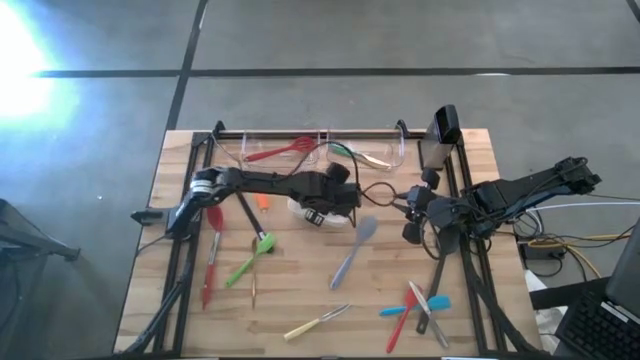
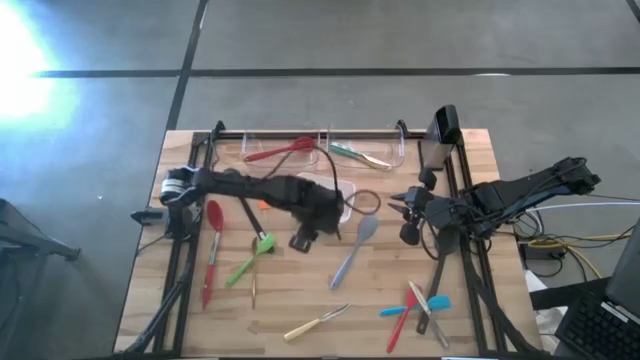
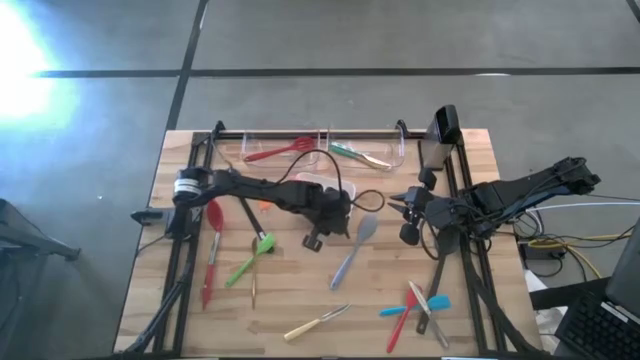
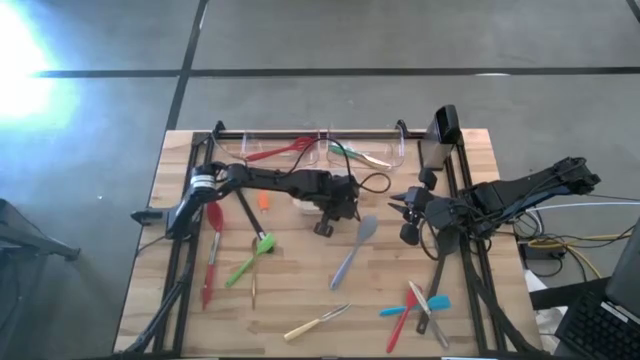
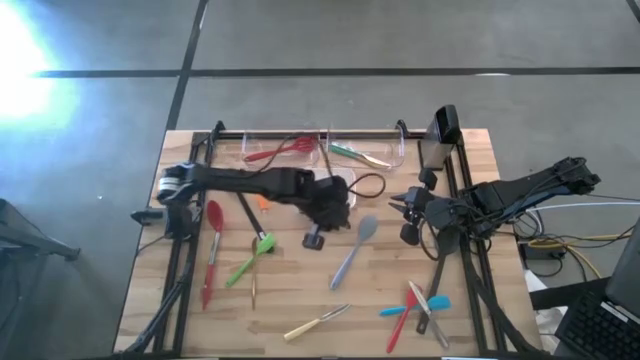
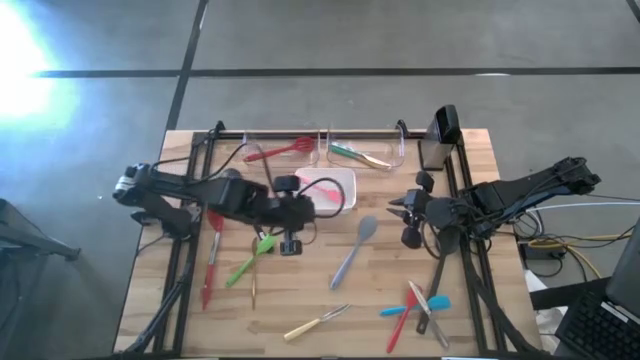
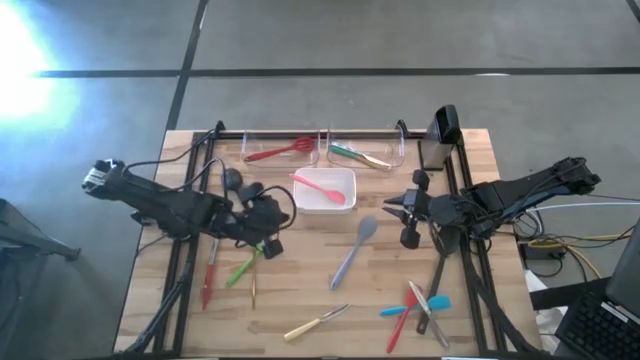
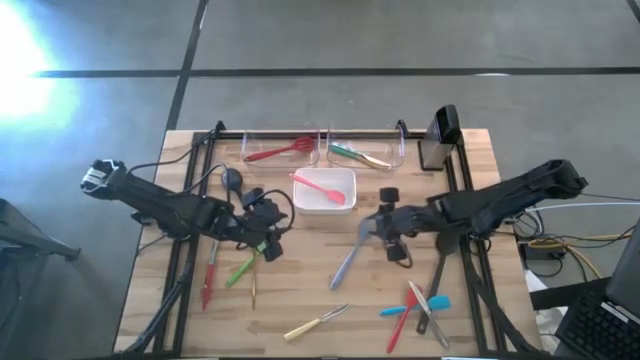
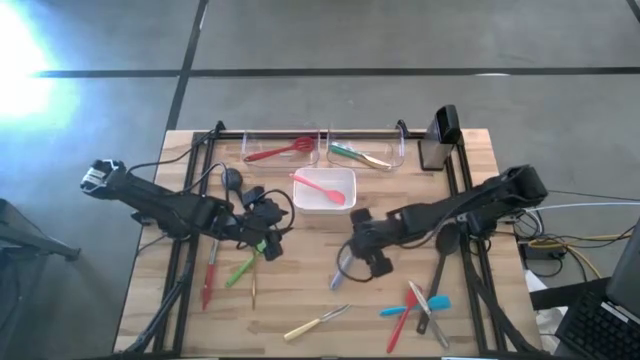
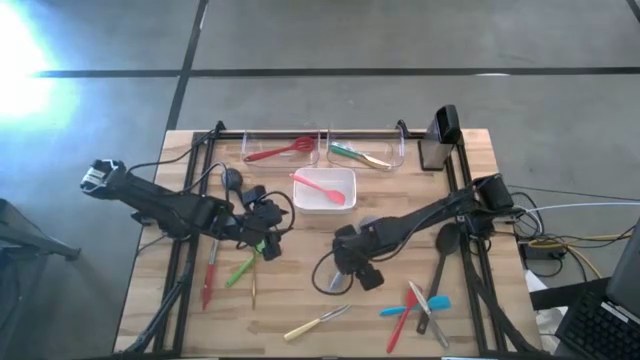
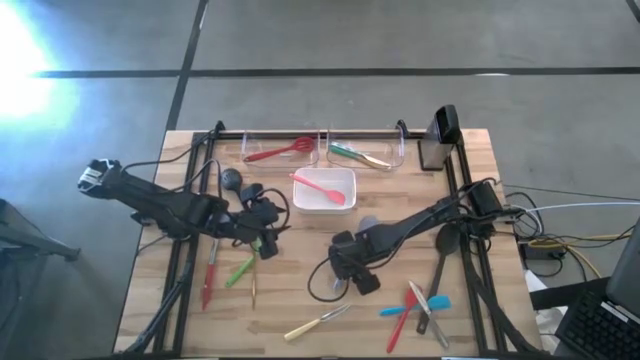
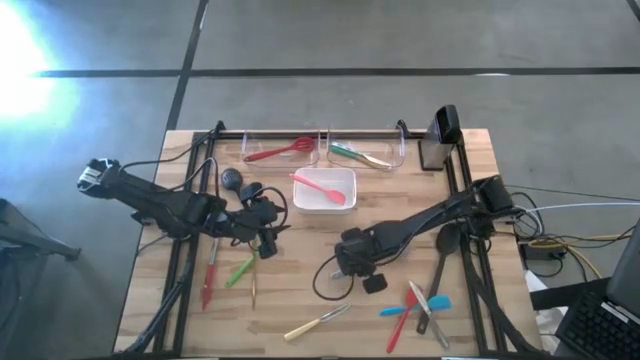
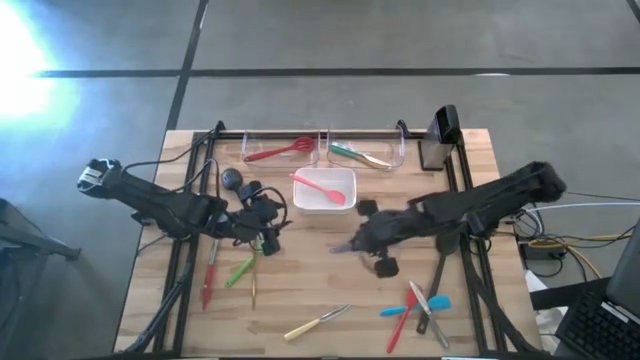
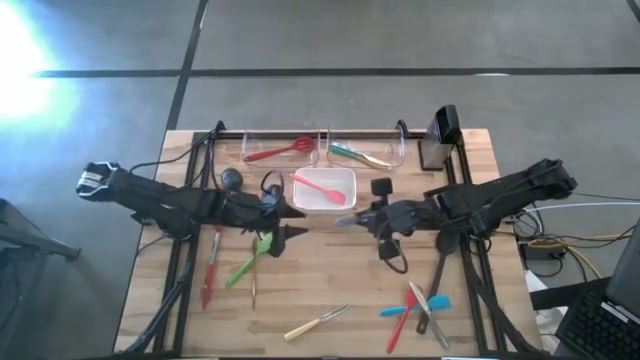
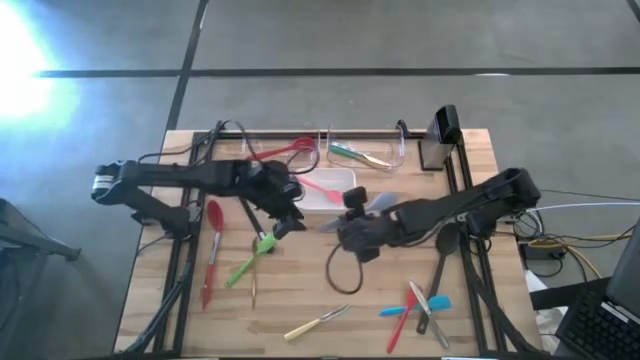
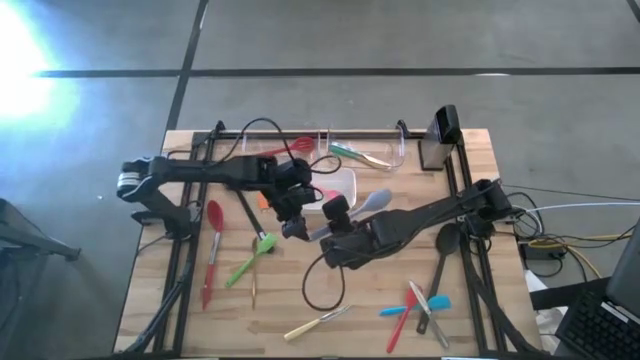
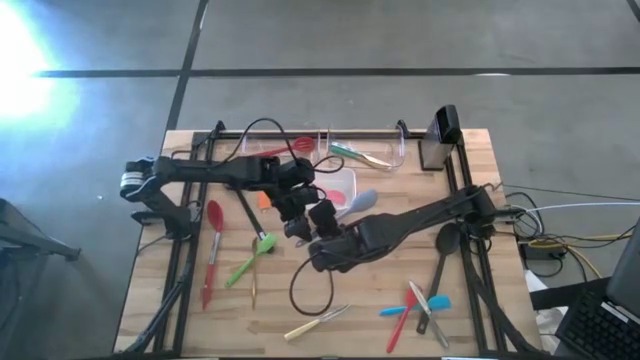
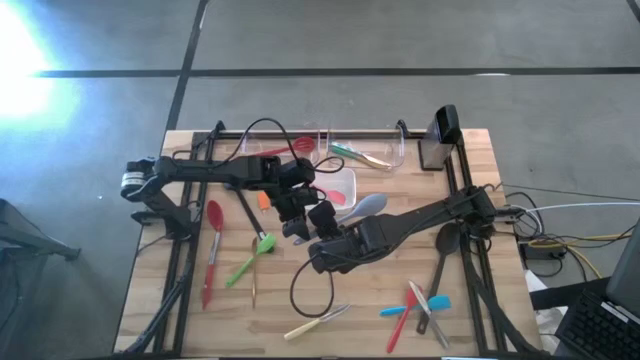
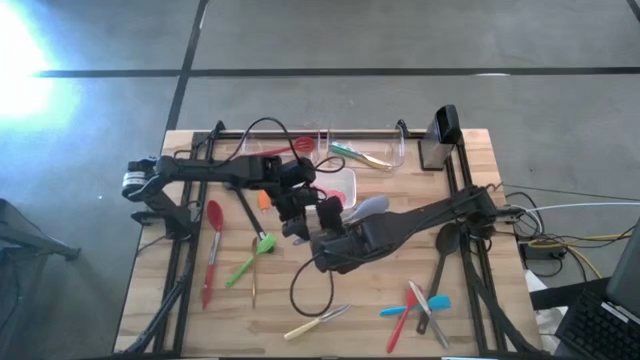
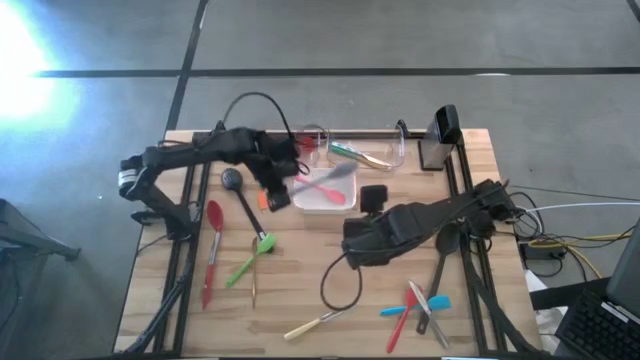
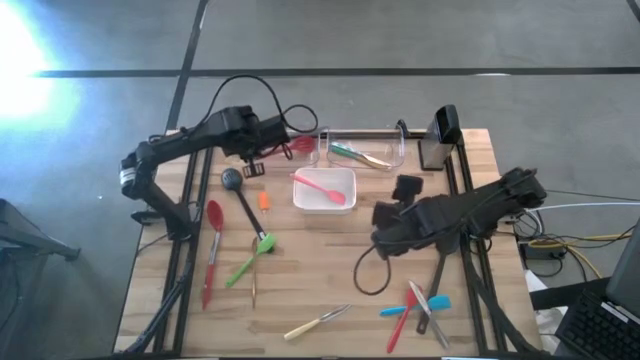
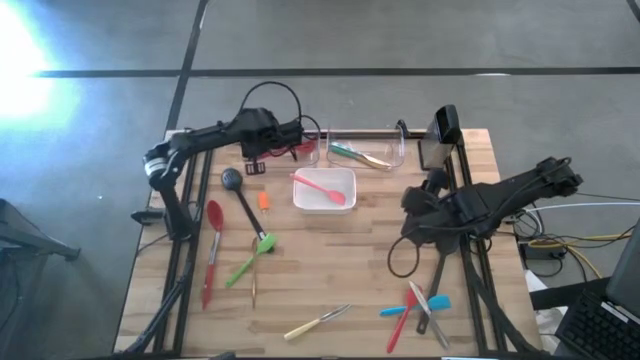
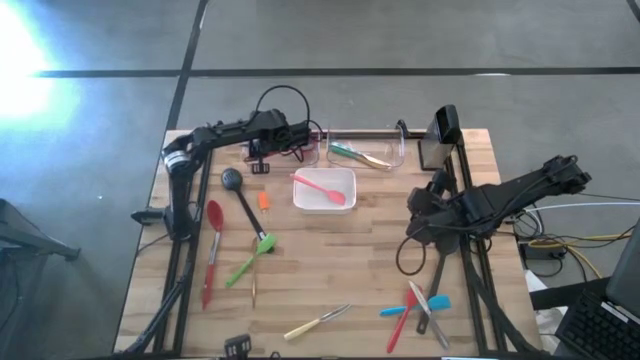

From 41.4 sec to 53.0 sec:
Task: Pick & Place Kitchen Items
Put the gray serving spoon into the left transparent bin

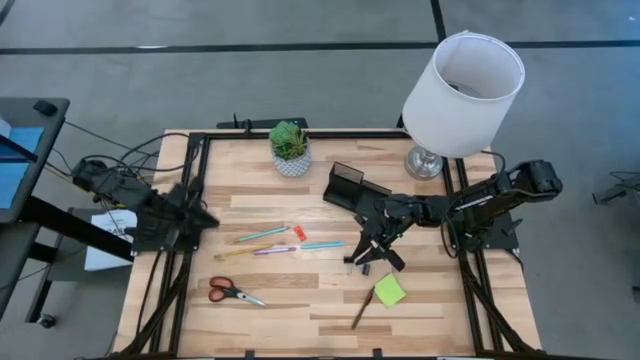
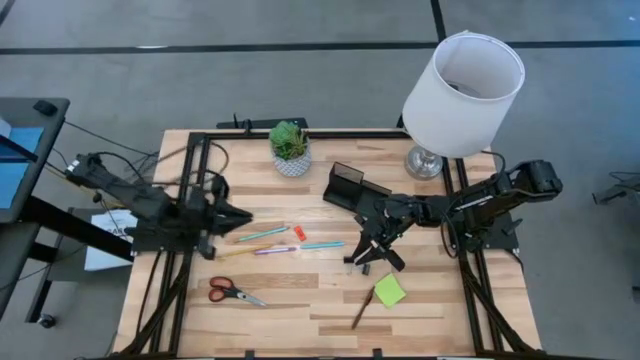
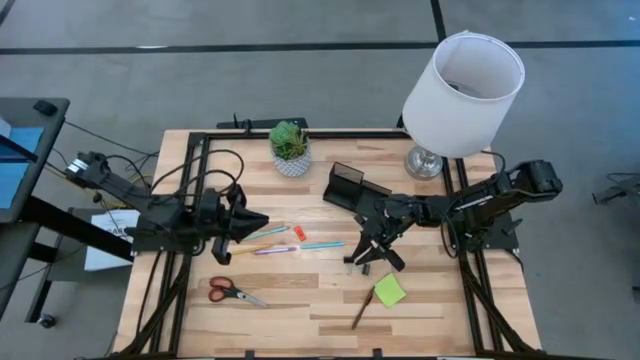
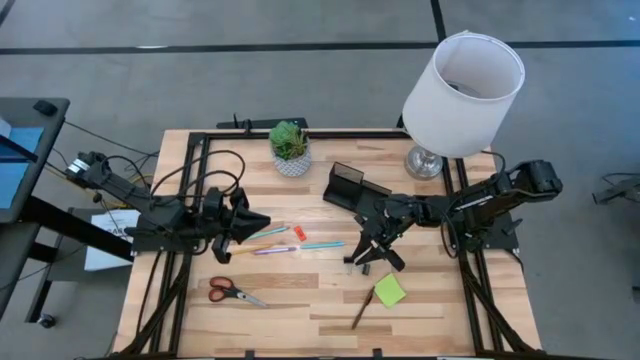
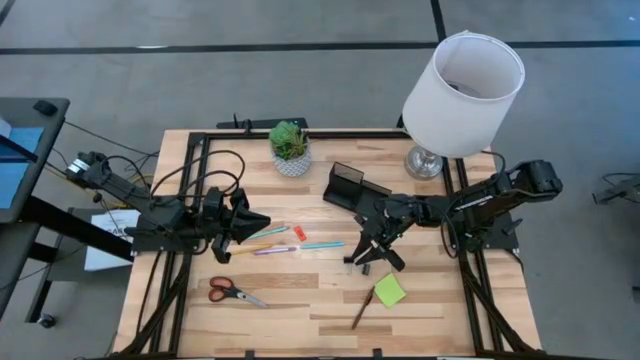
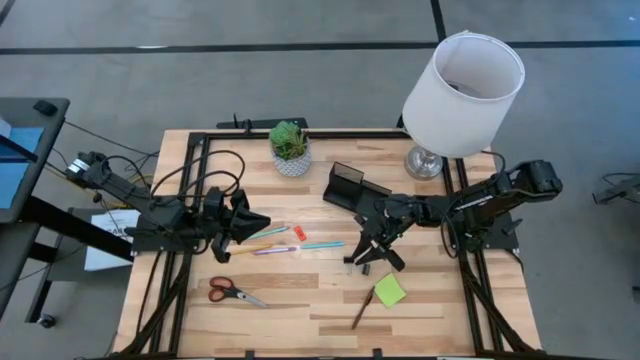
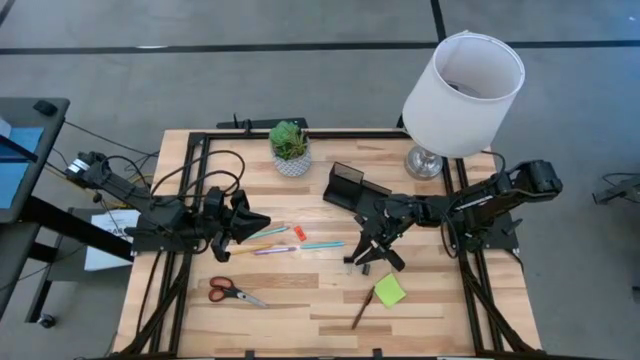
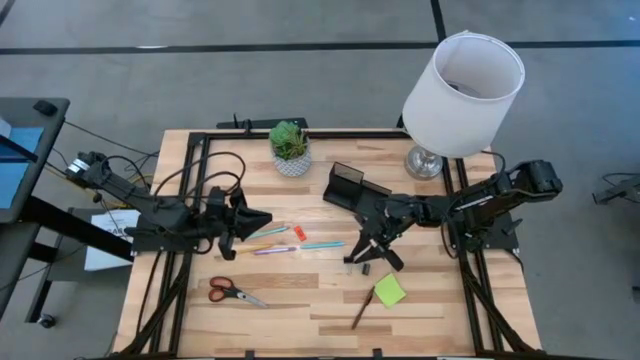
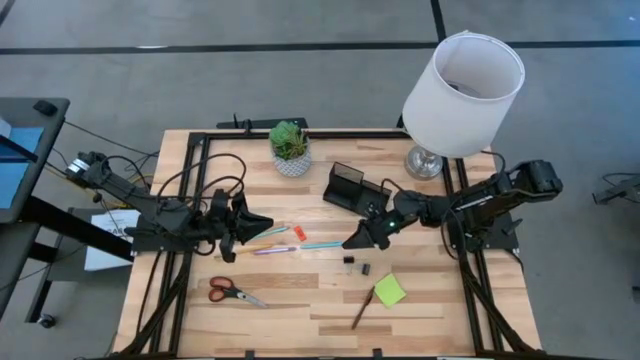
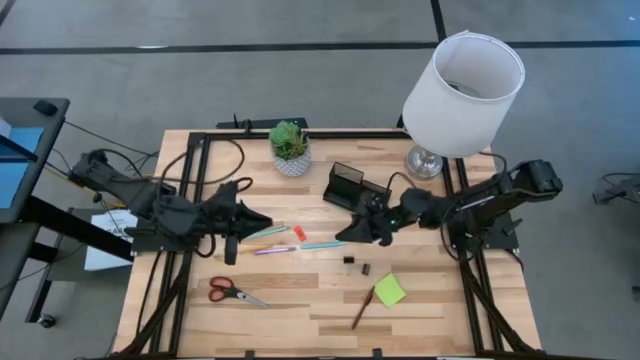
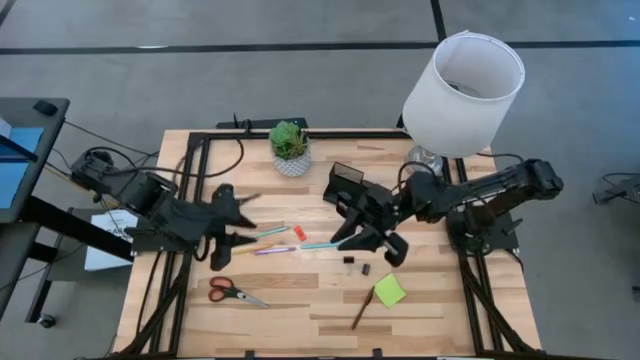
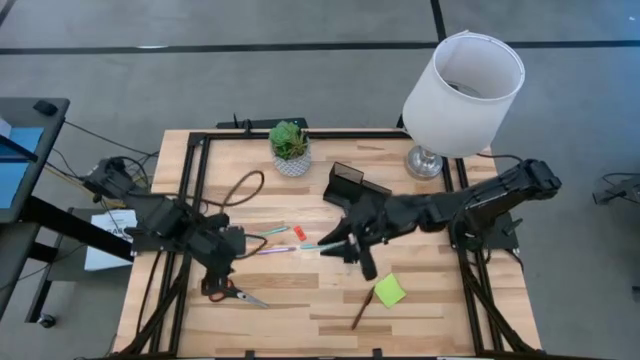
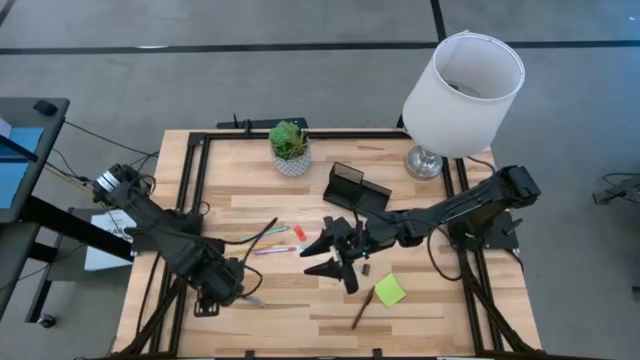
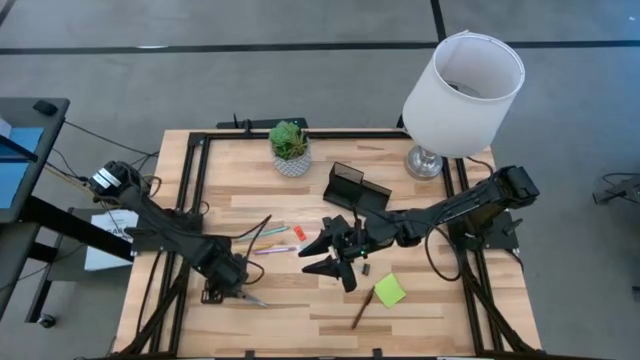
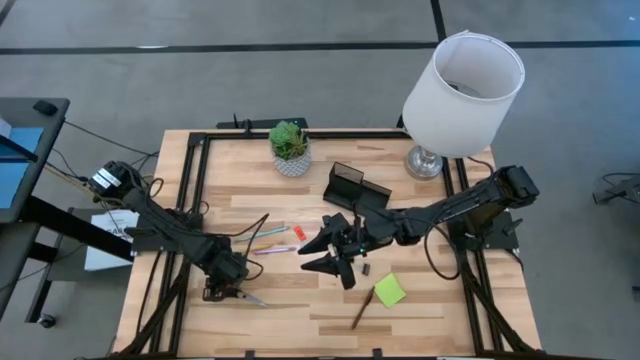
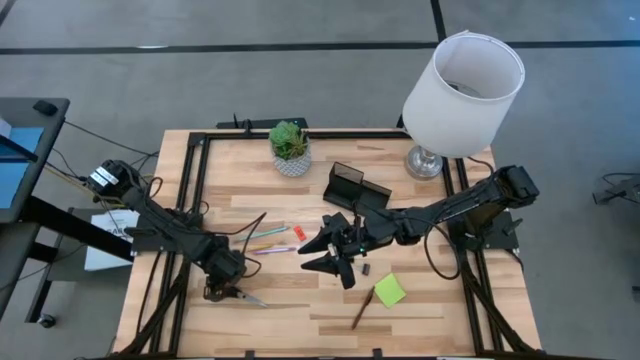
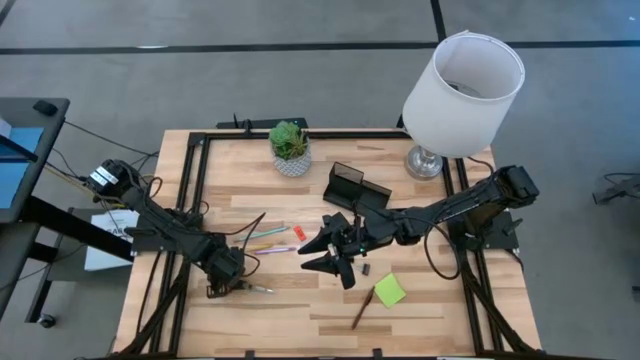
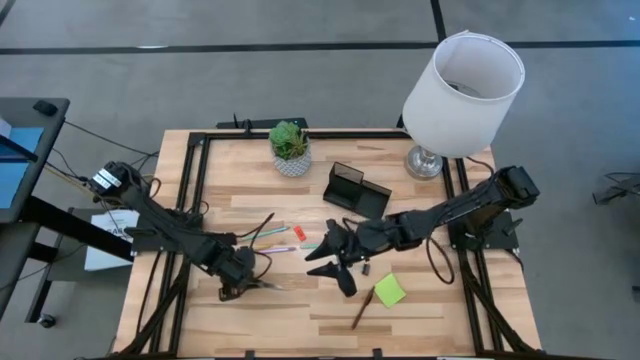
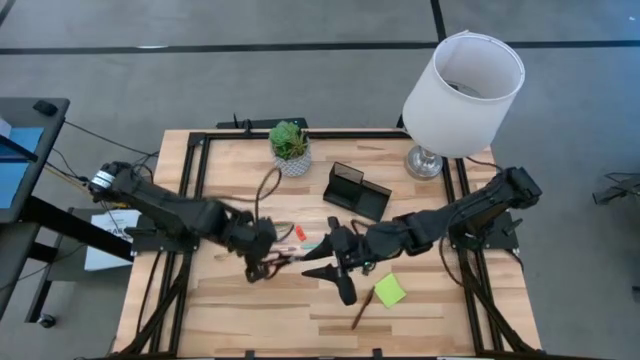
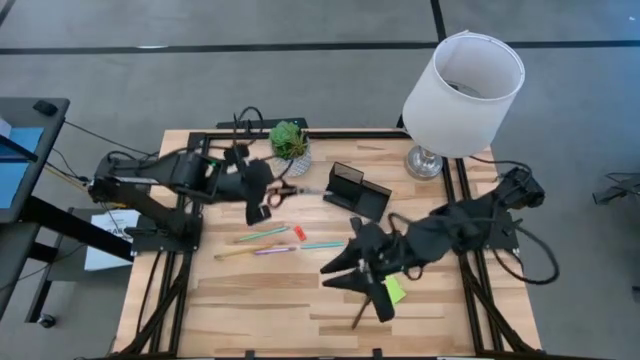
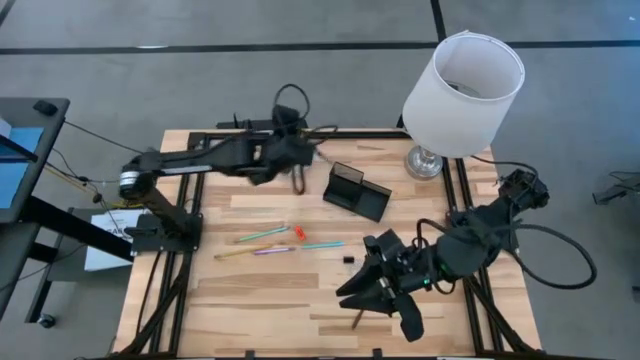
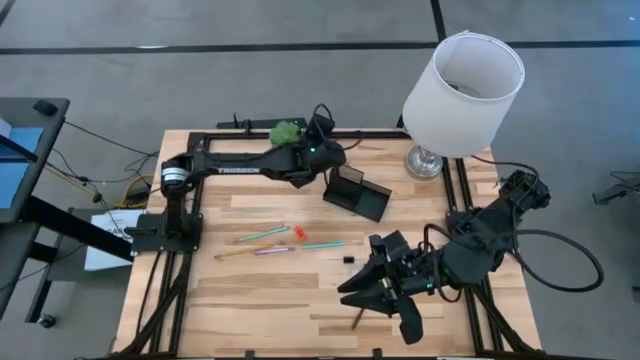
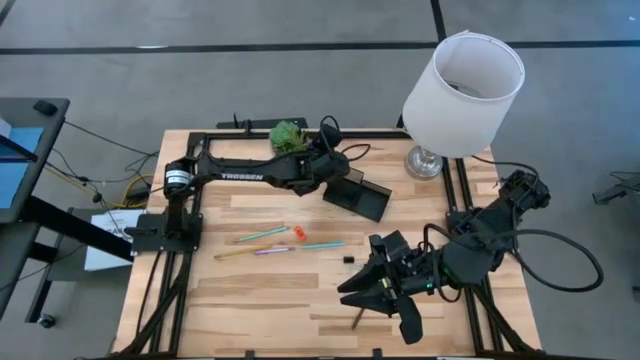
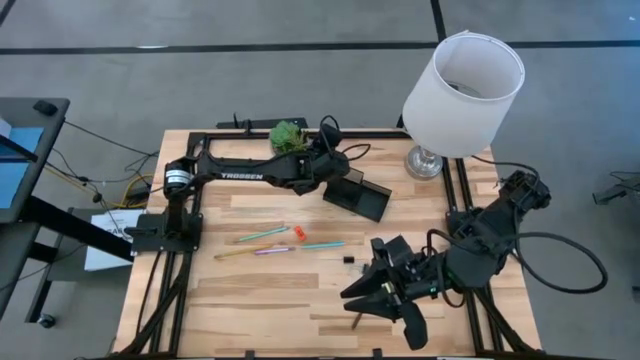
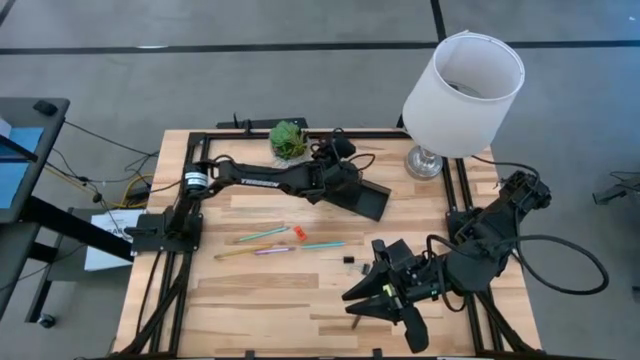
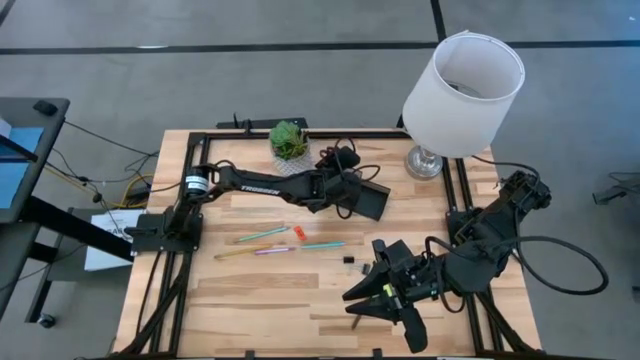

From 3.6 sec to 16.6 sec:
Task: Pick and place office supplies into organizer
Put the black scissors into the black desk organizer
